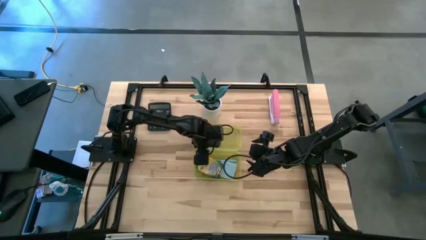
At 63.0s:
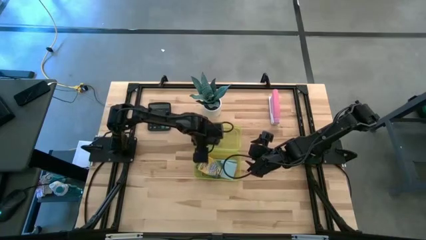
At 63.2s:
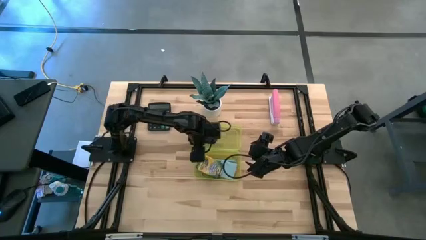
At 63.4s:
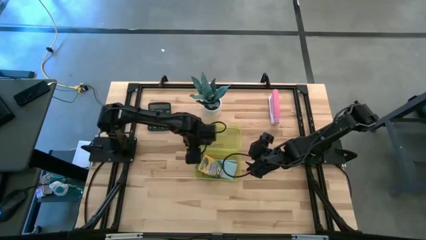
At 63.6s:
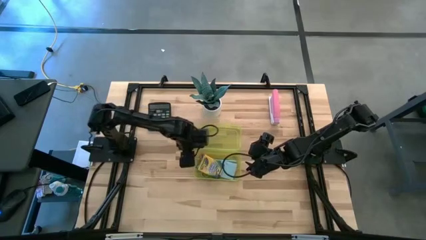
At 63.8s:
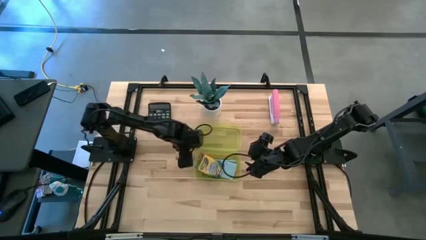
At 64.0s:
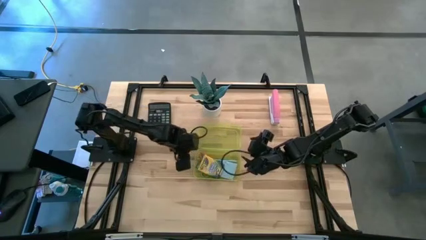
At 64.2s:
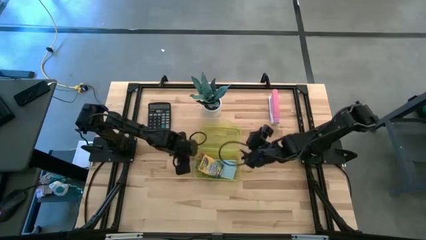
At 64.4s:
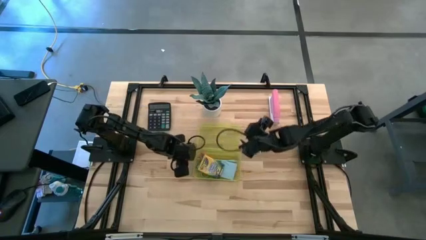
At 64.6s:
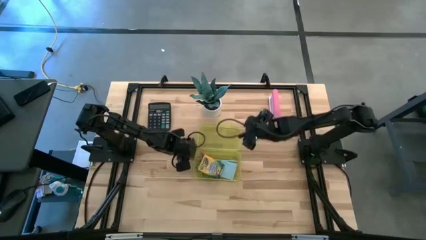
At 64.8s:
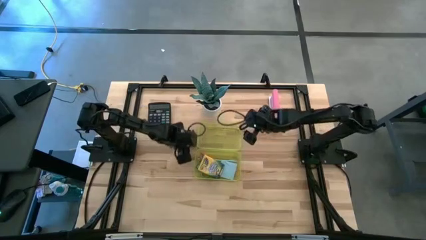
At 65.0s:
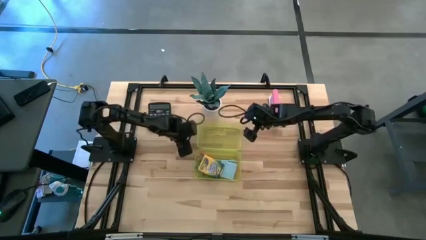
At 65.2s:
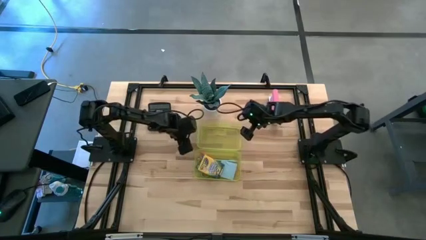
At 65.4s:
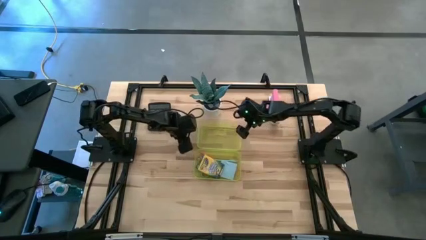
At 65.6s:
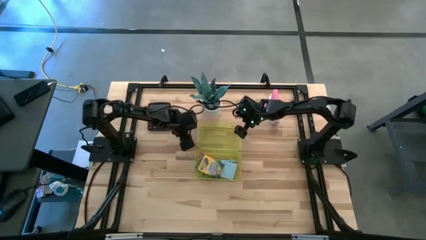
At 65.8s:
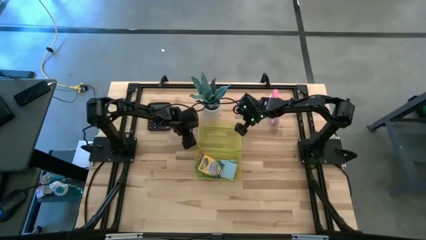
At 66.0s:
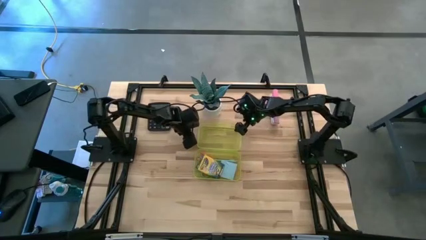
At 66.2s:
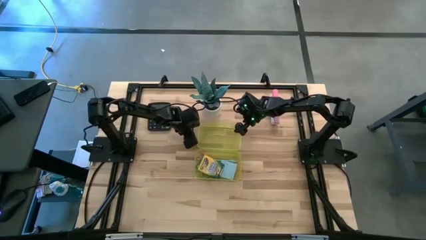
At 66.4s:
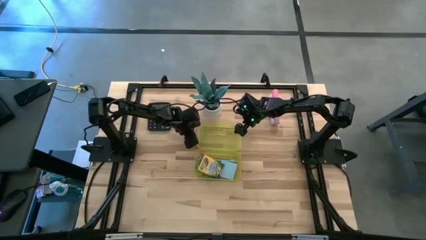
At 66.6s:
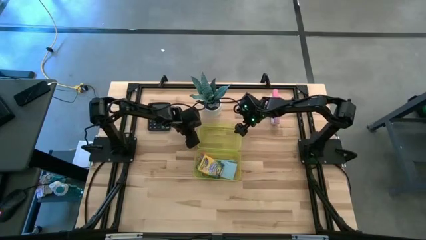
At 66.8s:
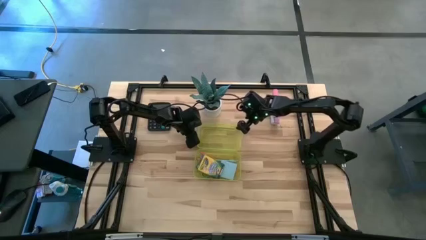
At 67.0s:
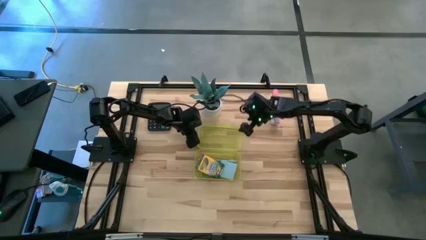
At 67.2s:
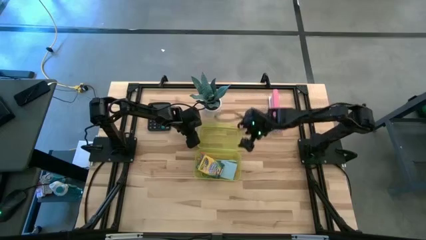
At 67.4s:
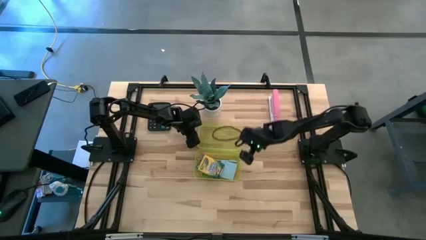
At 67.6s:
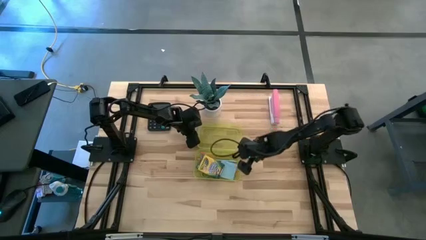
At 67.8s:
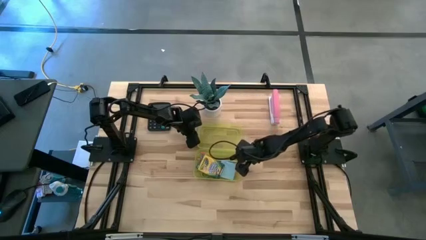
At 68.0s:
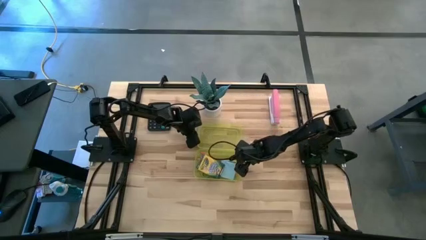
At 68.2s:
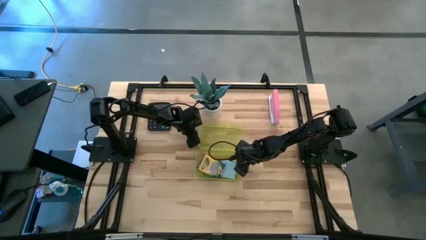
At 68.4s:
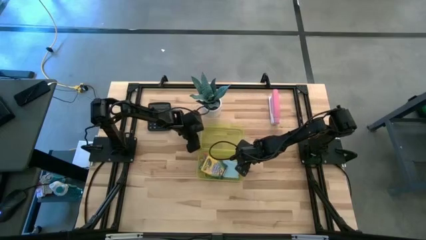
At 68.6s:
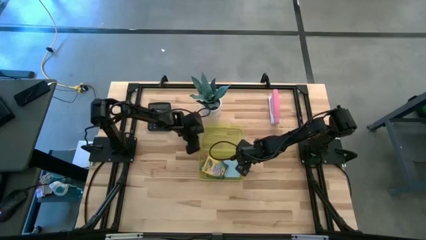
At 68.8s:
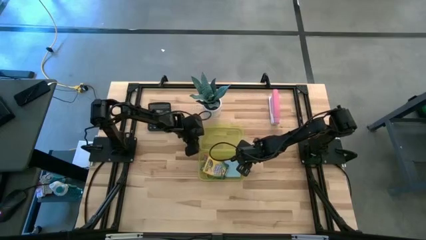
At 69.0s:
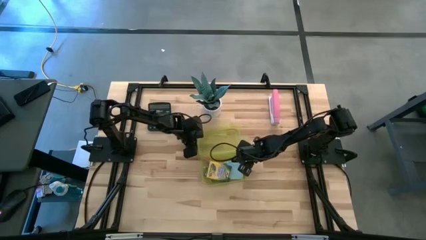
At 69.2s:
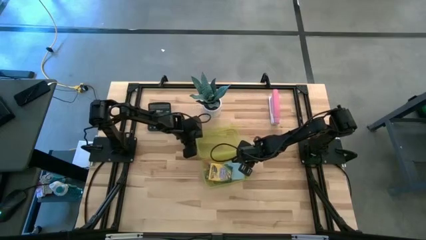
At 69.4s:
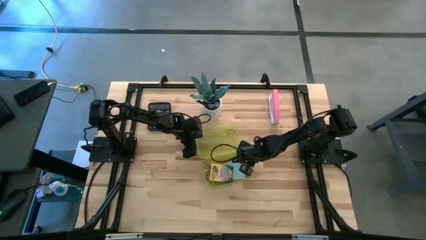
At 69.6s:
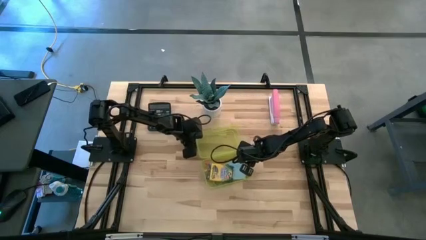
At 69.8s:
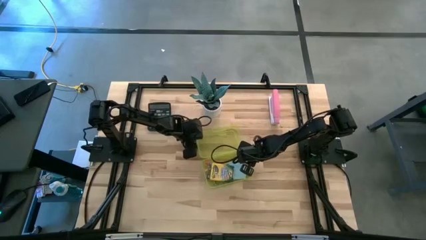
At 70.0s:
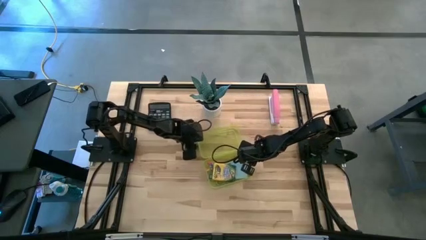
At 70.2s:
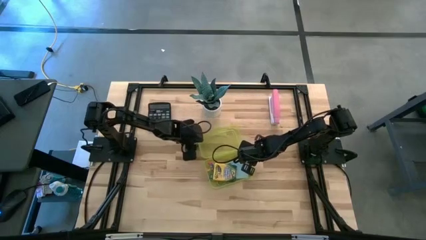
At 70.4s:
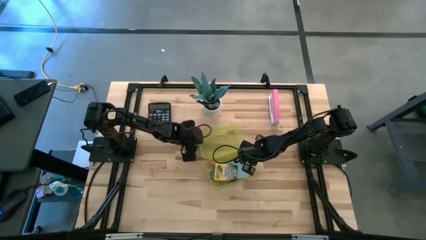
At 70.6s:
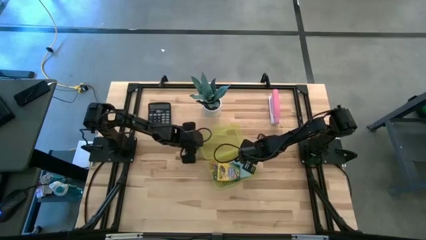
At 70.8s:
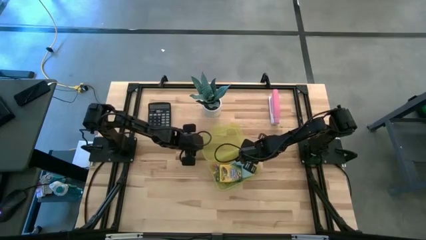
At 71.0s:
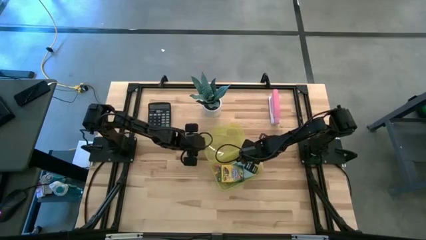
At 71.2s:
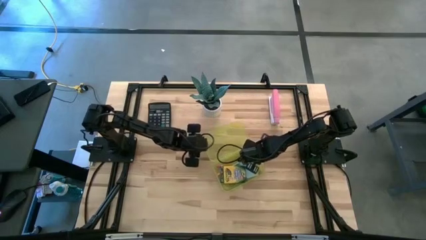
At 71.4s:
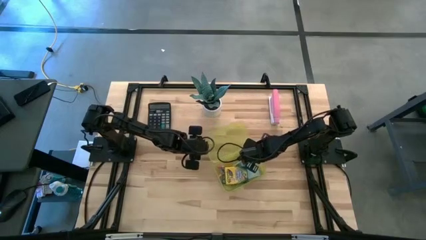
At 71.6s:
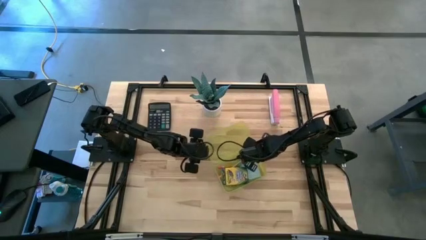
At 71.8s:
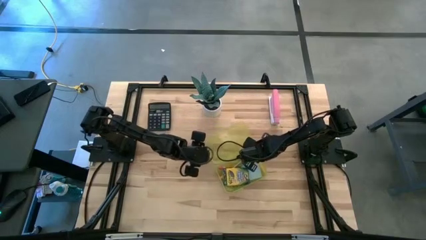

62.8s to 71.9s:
Task: Pack school essentials
Close the yellow school supplies box

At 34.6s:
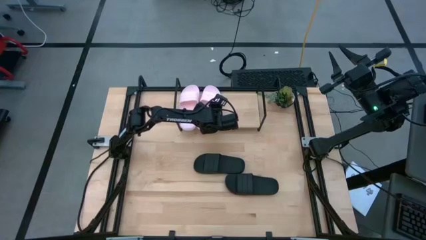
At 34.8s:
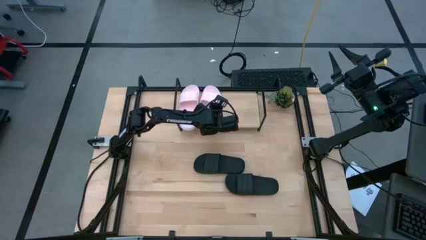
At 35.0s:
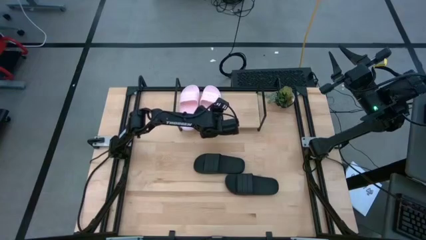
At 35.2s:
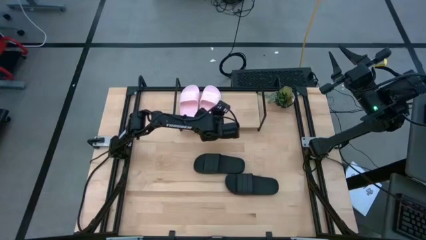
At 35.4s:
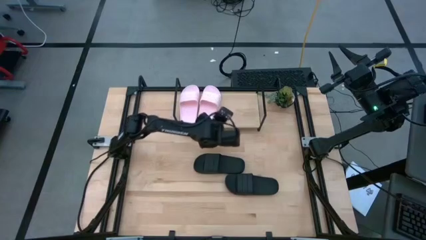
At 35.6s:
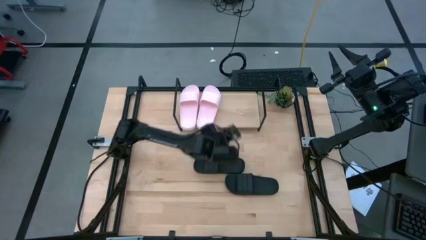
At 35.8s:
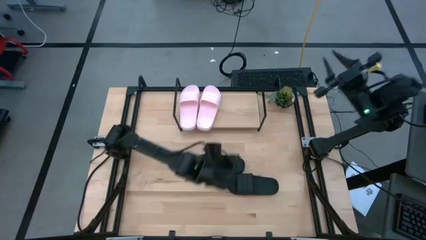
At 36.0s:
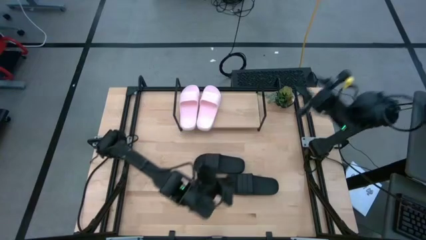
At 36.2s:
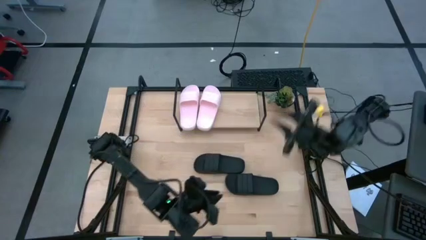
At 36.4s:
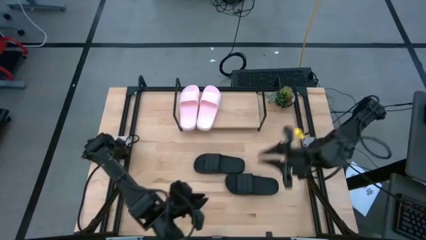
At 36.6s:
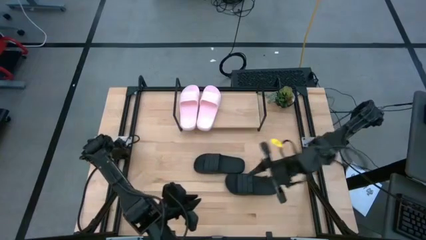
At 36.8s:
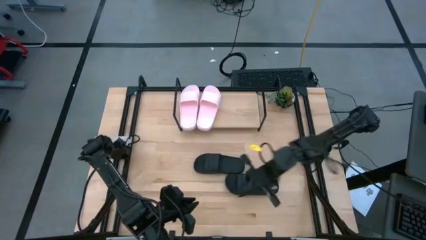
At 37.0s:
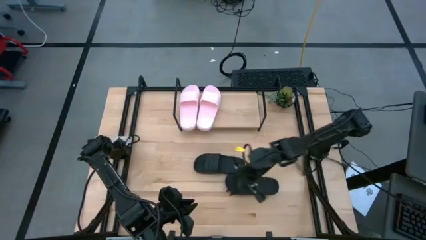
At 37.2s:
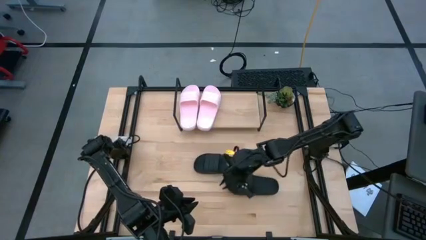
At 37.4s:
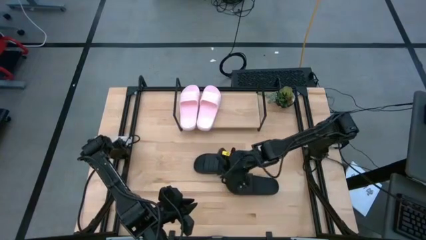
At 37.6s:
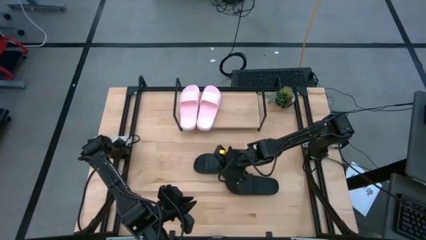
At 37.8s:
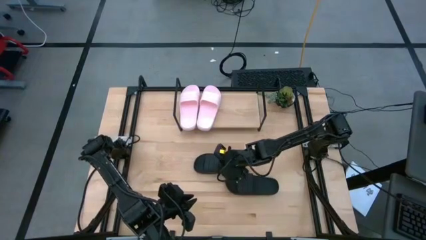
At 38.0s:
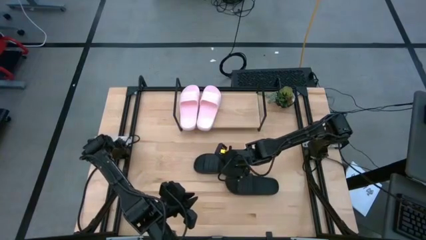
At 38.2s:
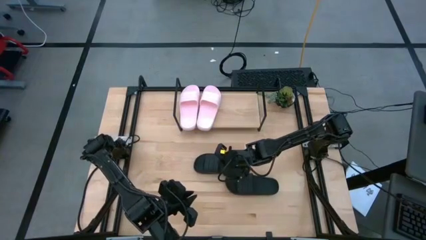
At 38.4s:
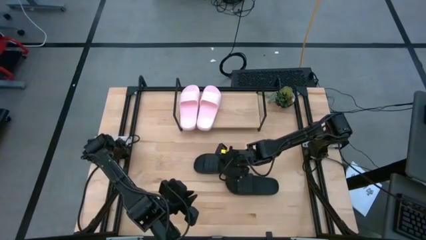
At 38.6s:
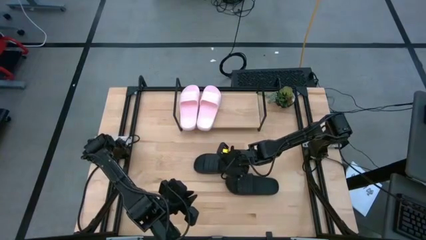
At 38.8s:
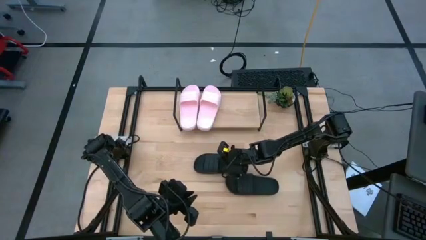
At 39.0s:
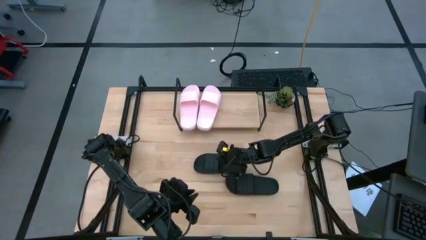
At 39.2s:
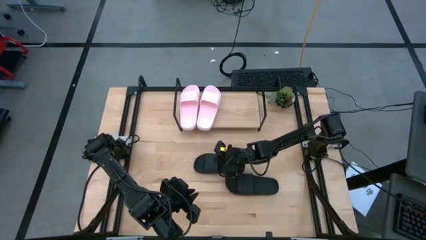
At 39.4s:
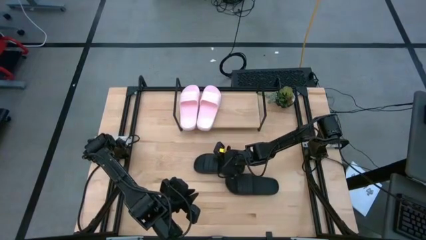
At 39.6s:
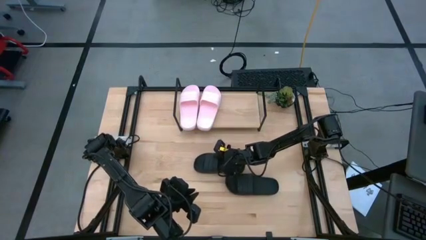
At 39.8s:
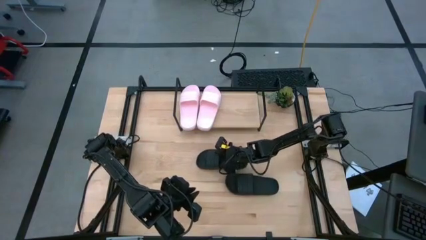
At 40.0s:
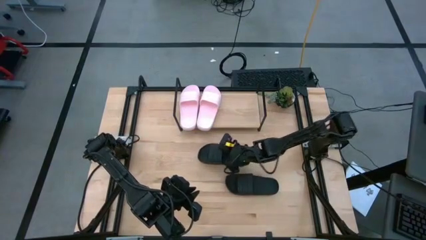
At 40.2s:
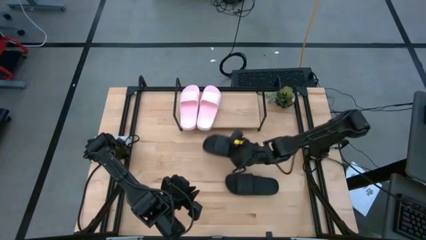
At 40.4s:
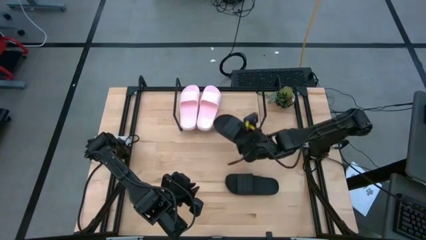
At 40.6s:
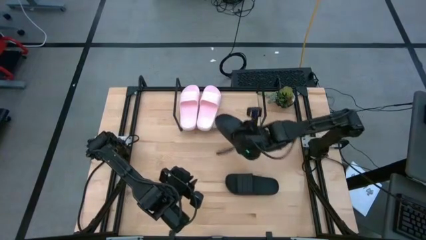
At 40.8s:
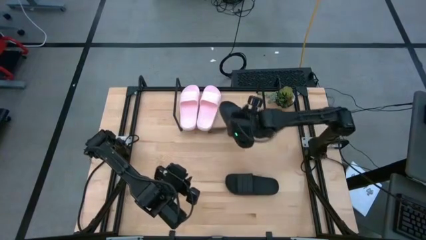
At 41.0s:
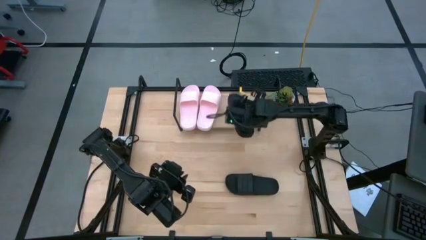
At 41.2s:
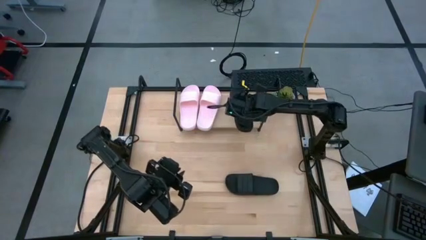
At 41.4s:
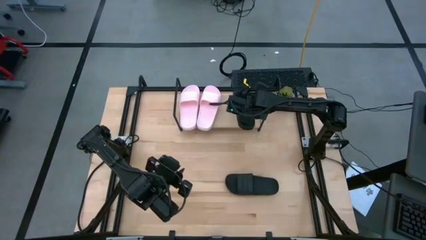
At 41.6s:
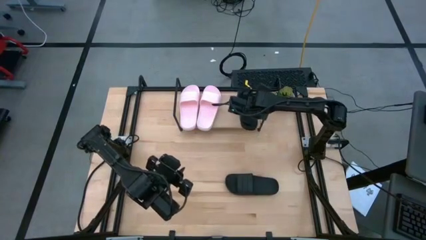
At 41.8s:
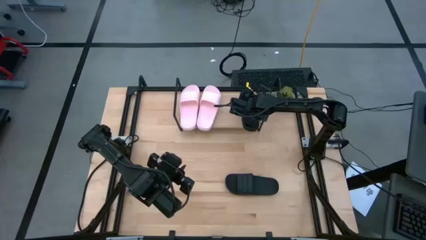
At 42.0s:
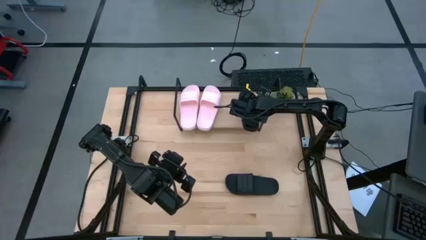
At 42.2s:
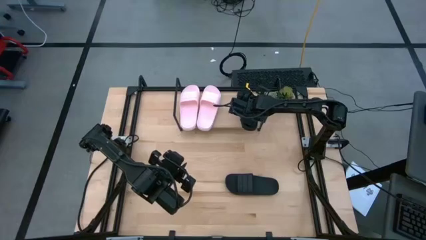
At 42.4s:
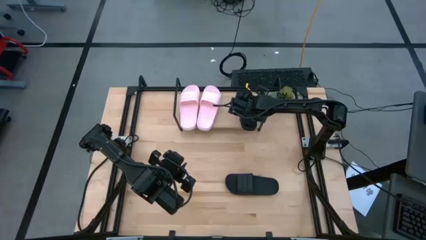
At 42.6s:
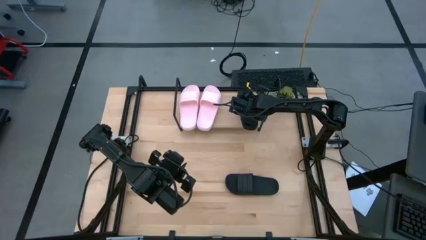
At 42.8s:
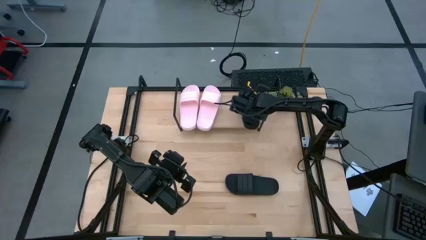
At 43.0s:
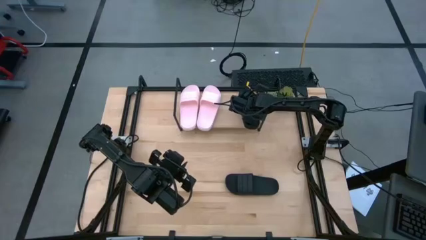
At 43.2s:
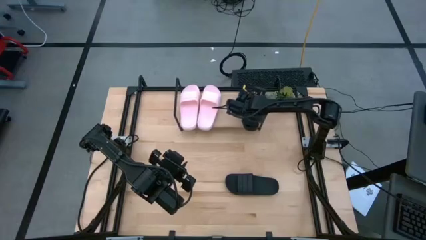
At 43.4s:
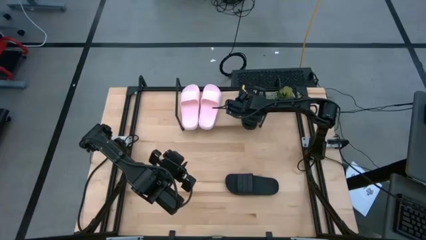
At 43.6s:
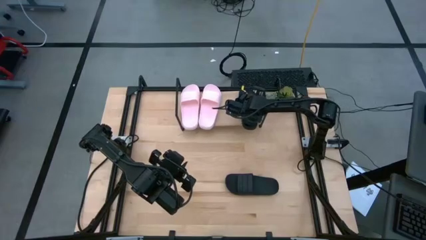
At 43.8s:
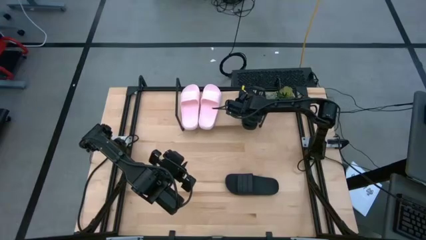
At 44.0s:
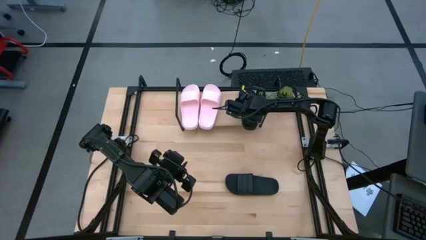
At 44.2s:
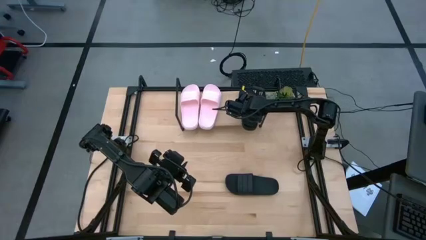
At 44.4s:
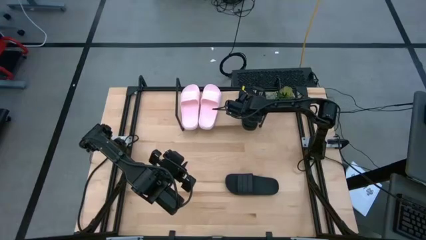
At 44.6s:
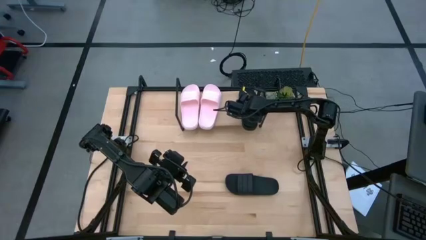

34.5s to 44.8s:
Task: Pick and place slides into the shelf
Put the top black slipper on the shelf
